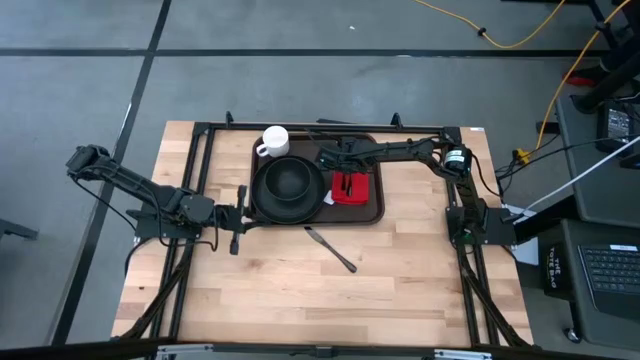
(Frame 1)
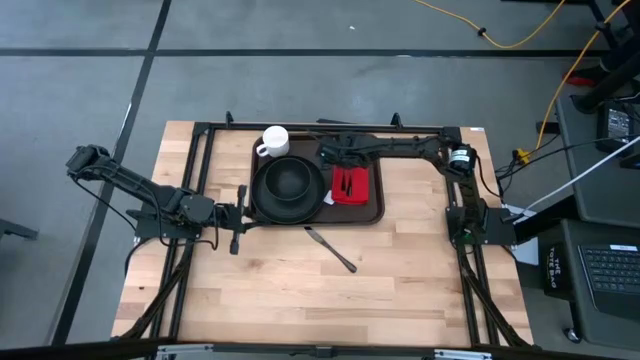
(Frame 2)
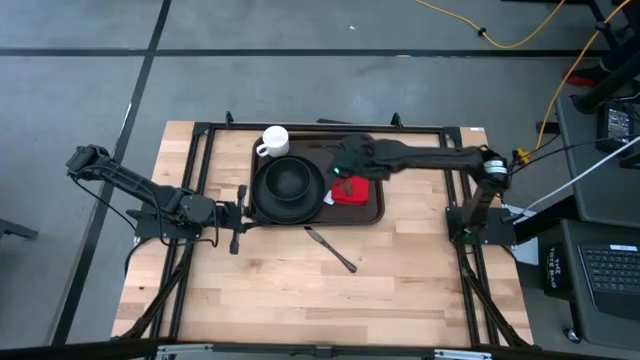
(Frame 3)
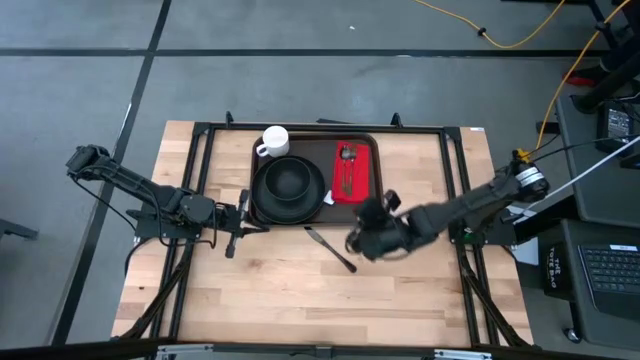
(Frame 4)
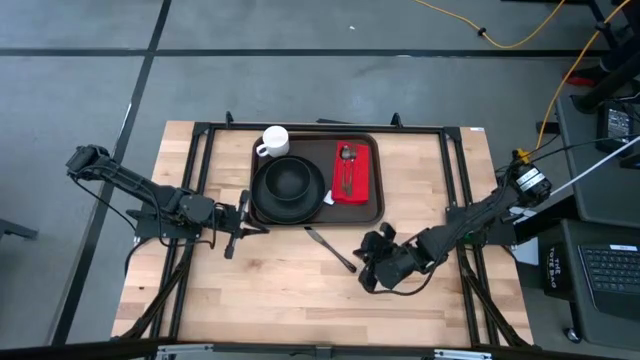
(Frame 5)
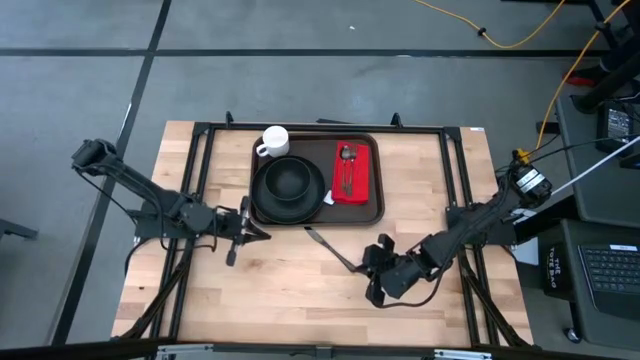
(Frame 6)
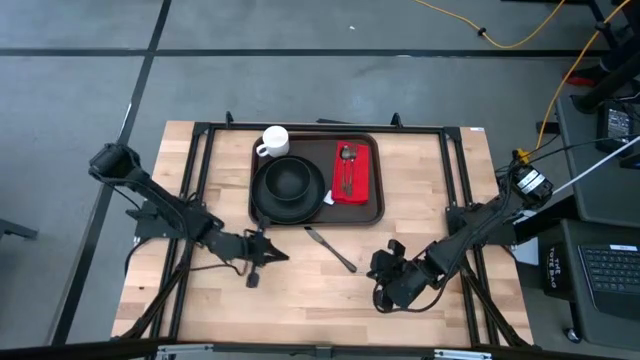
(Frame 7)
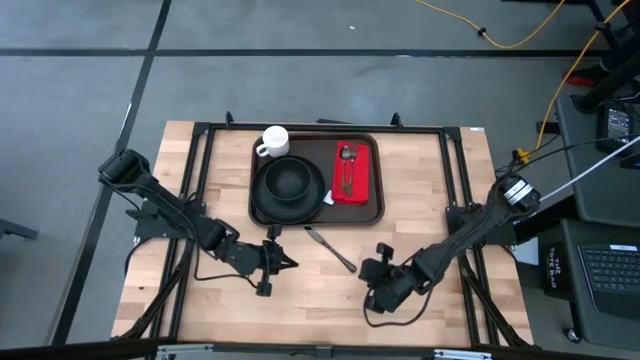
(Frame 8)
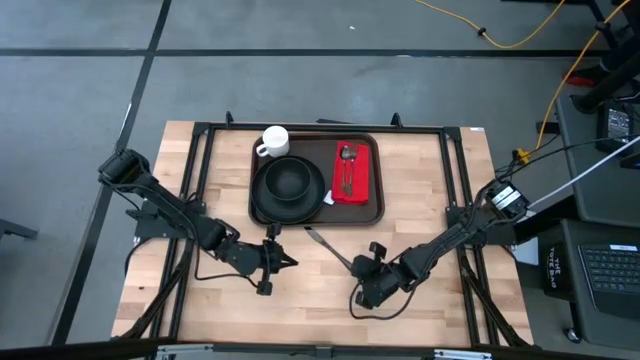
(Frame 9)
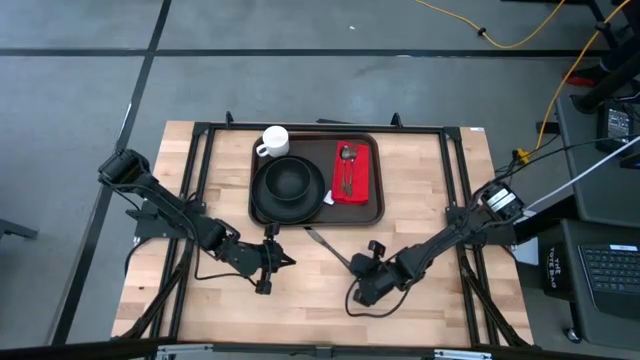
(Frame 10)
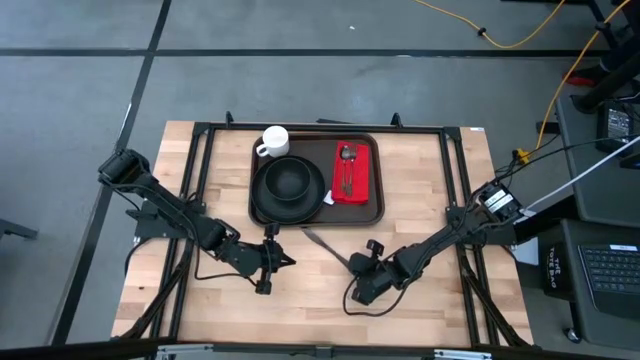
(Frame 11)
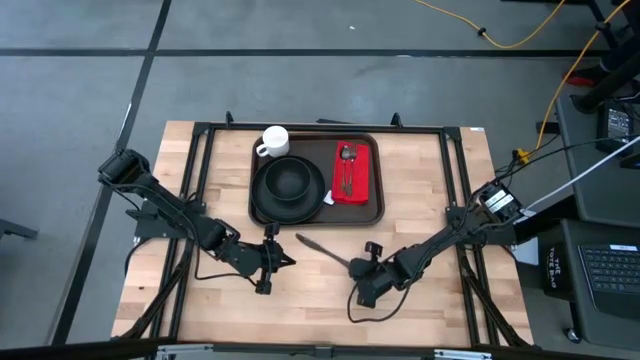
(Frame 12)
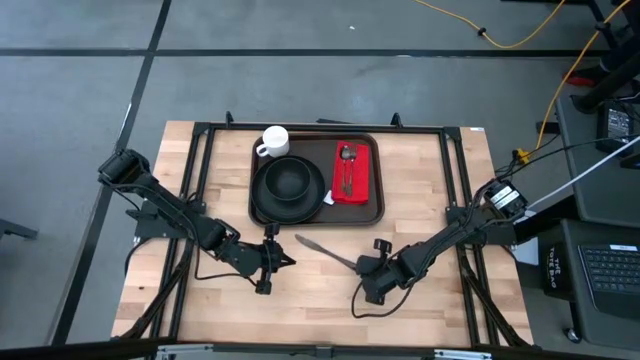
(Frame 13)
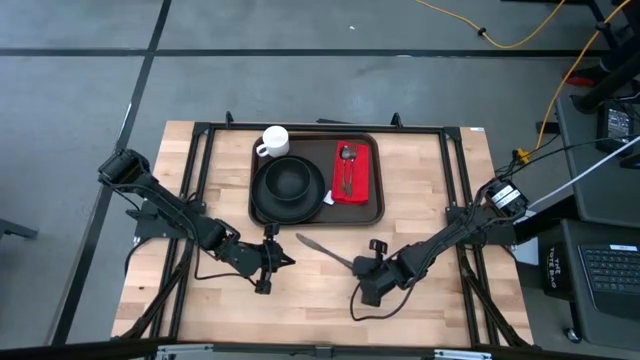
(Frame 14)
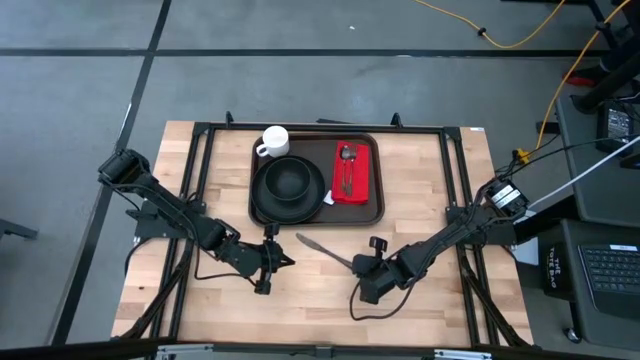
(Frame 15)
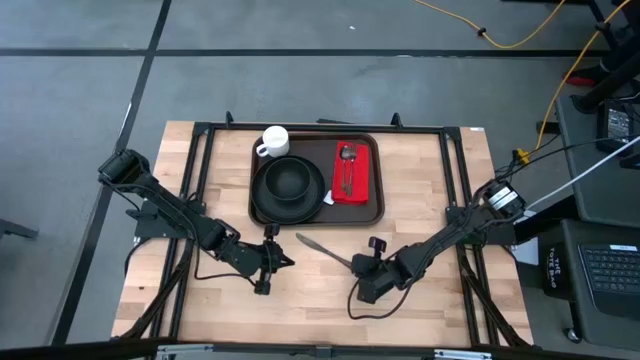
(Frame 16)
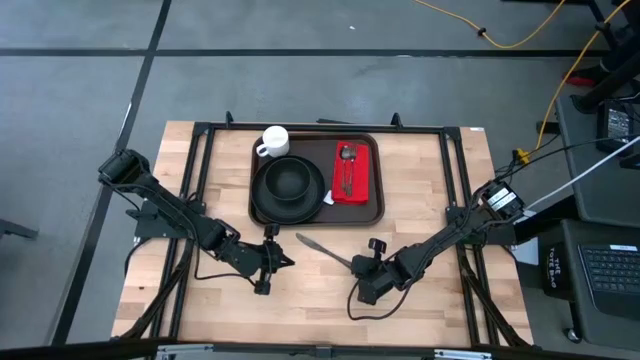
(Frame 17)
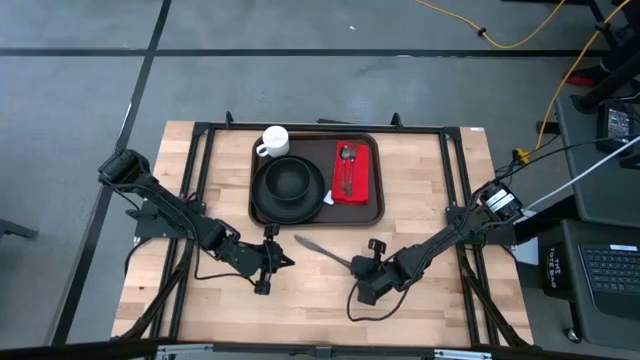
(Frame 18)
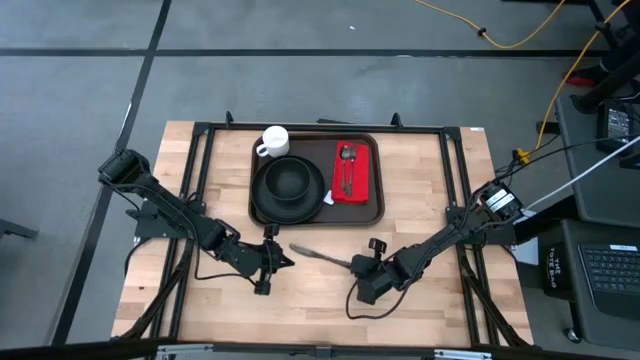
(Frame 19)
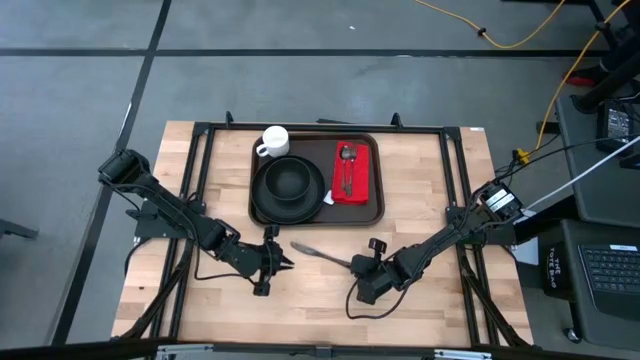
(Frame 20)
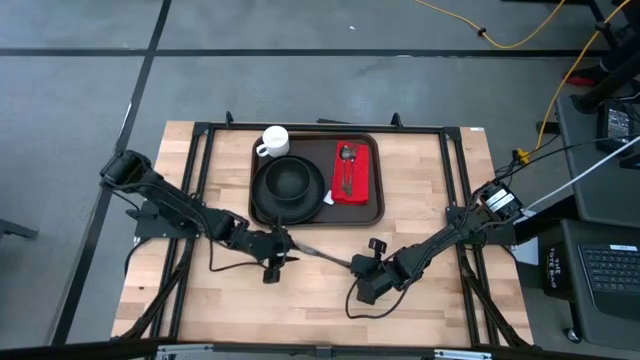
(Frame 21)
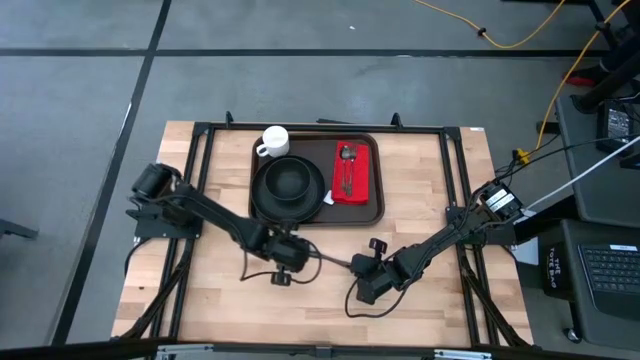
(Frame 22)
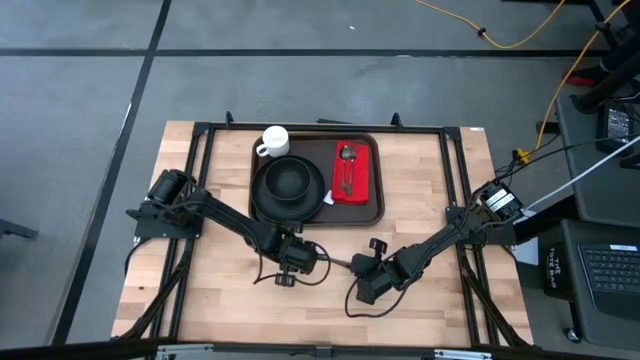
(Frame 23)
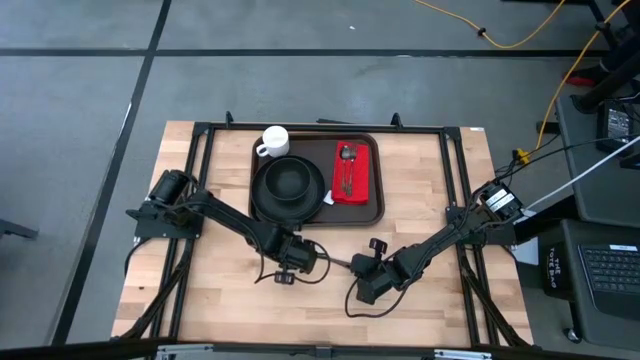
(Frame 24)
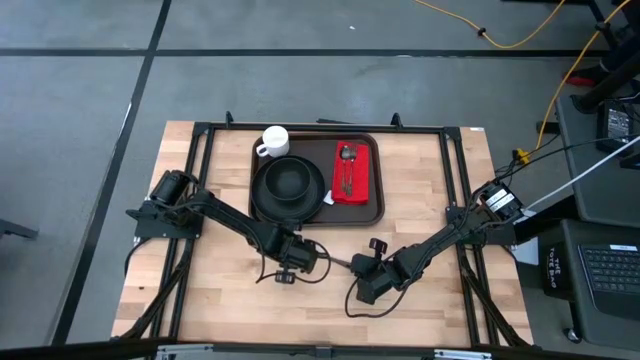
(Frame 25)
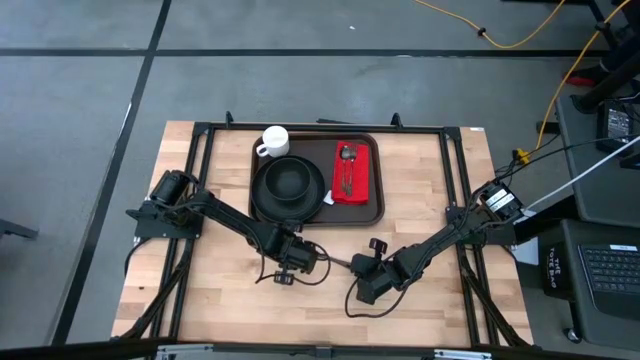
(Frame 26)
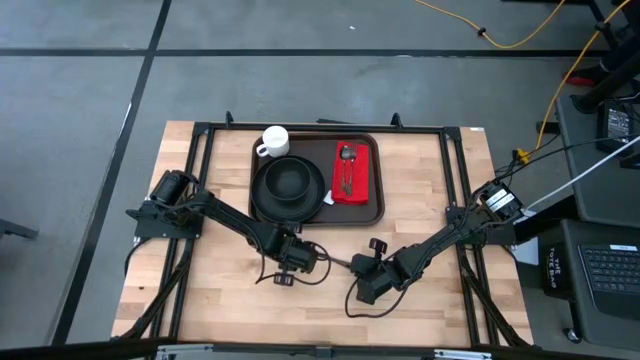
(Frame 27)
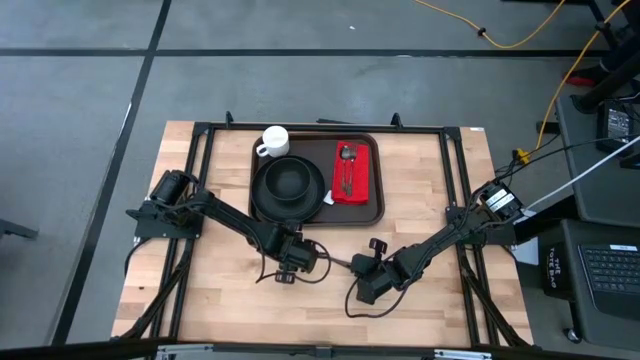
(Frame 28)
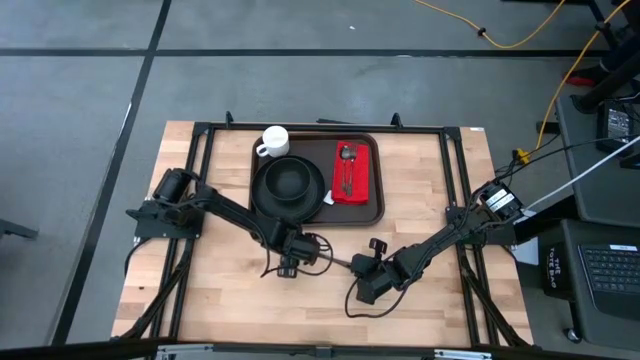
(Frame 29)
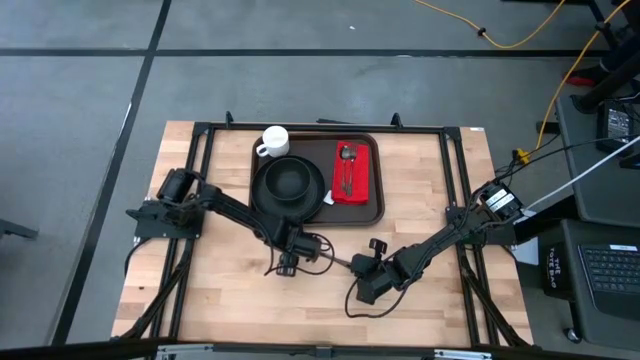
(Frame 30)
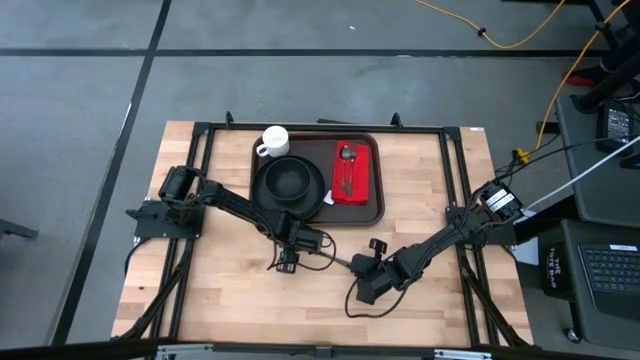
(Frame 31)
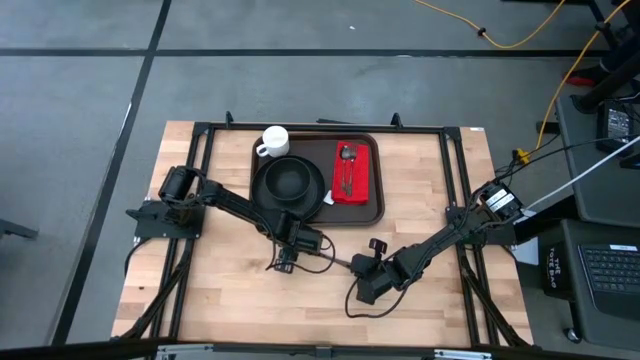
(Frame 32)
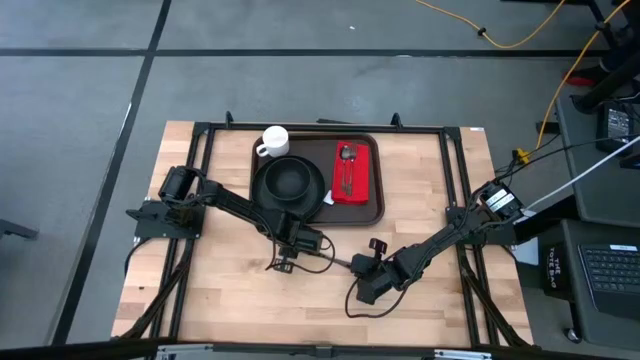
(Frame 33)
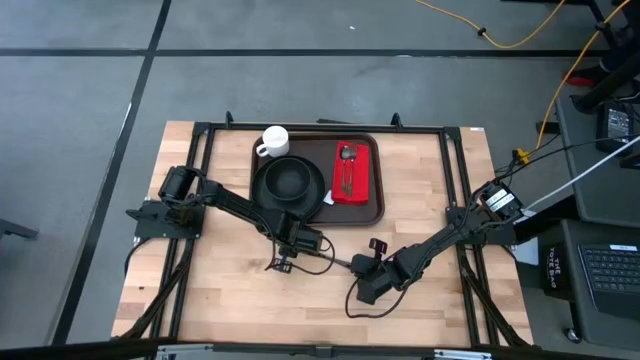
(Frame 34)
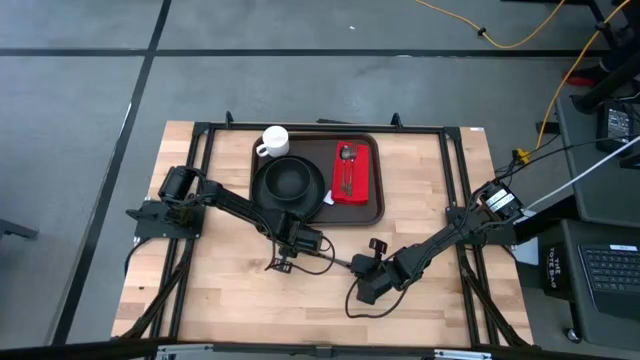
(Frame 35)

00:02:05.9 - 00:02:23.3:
Task: Set up tray
Put the black table knife to the right of the black fork on top of the table napkin on the brown serving tray

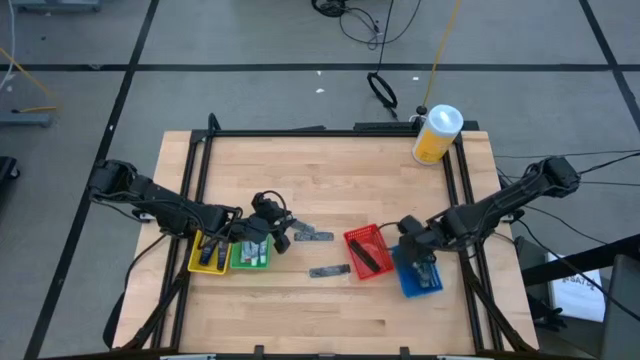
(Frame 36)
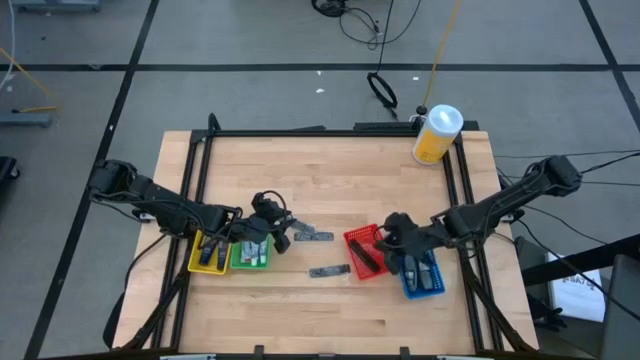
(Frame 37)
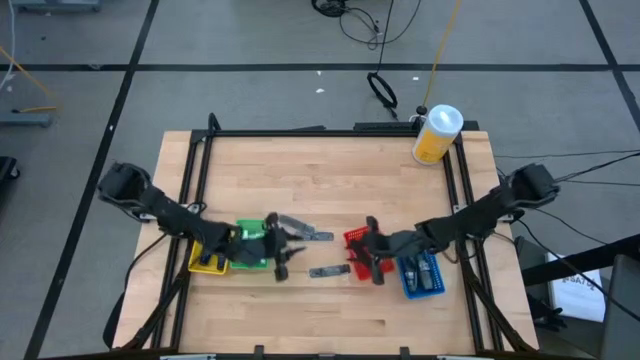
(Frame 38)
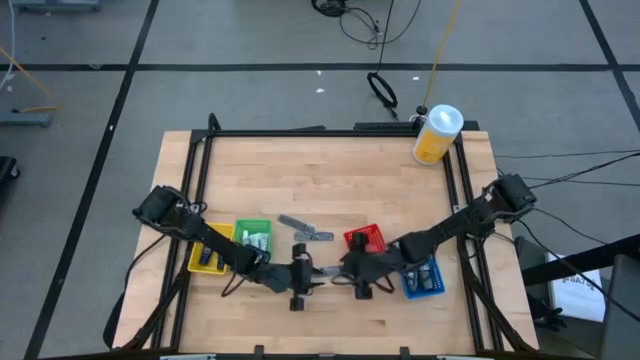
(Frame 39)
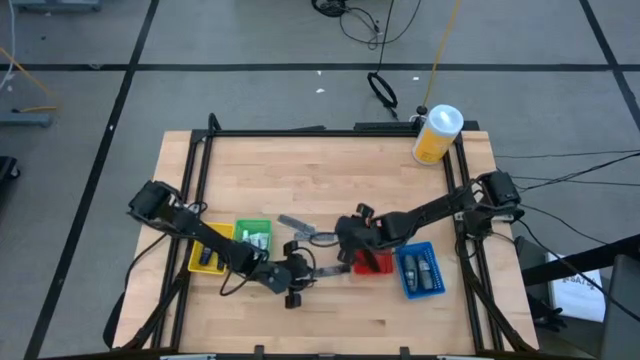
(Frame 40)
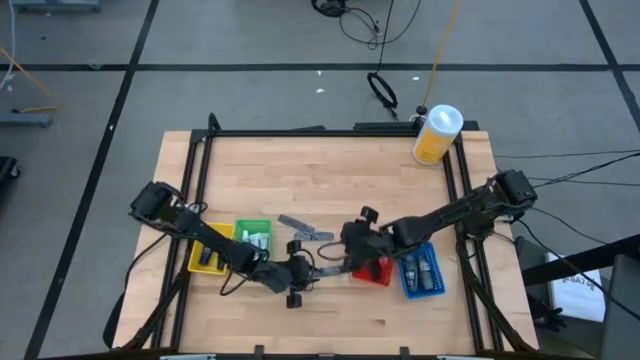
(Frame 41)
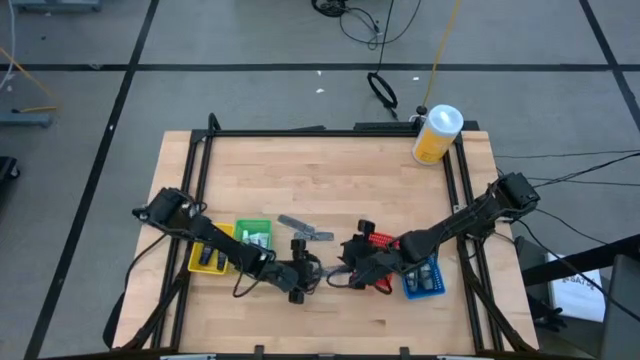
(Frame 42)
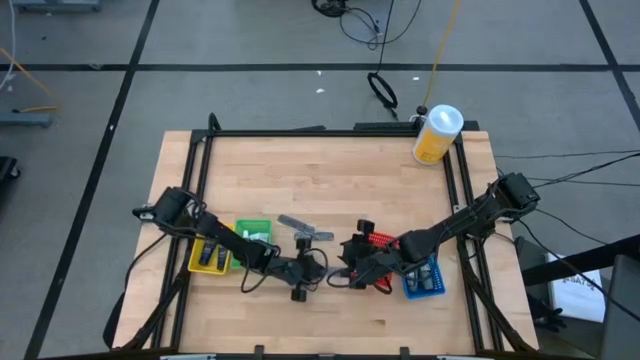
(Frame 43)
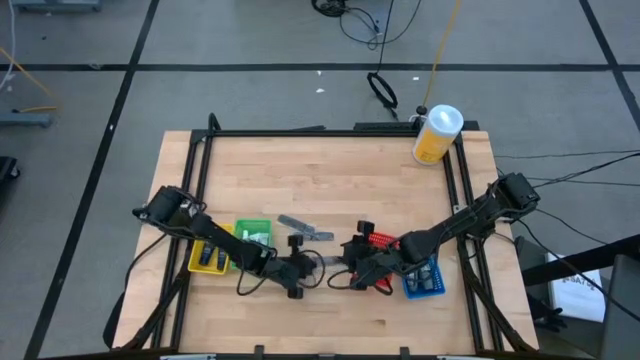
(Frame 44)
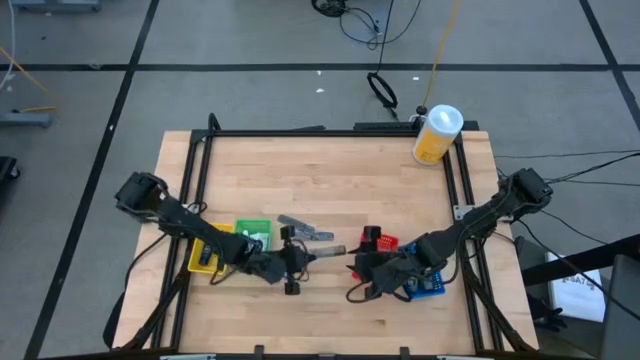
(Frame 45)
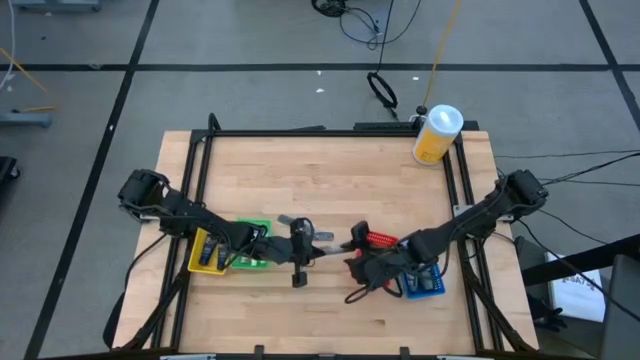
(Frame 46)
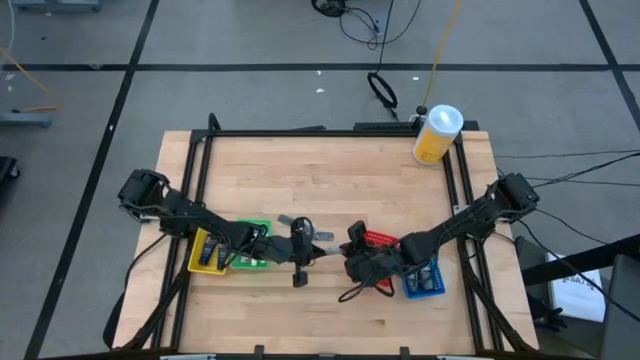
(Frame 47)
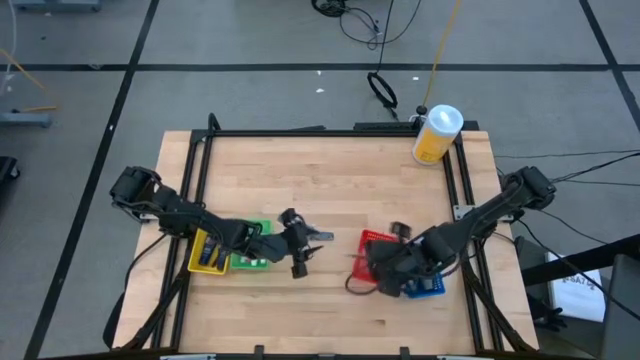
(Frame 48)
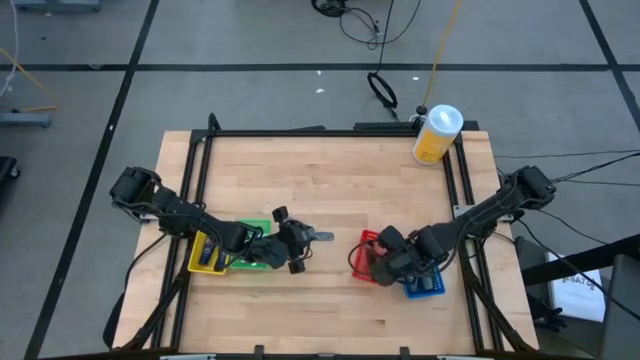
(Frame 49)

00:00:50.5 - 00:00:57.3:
Task: Pick & Place Travel size toiletries
Put the black comb into the red bin
